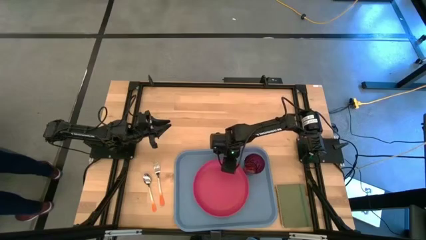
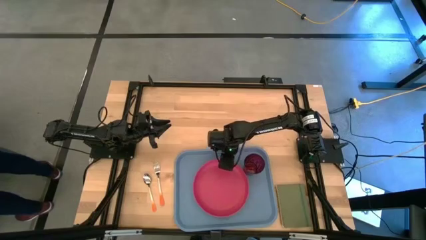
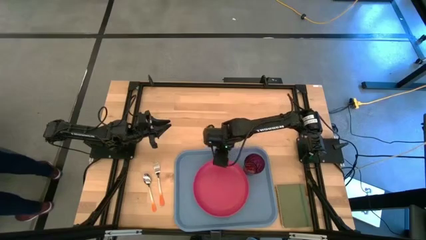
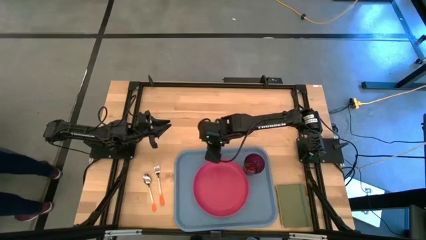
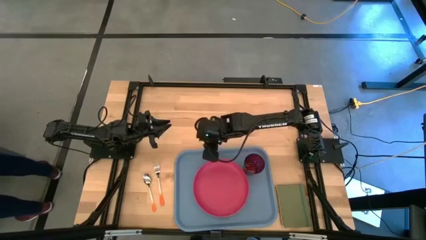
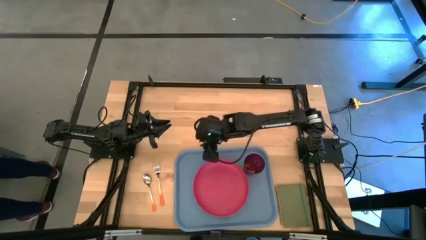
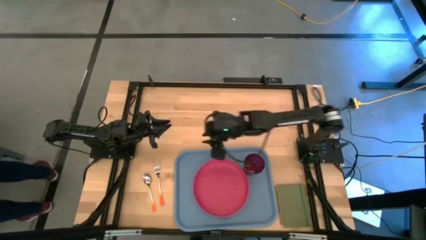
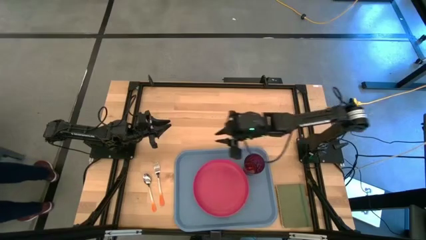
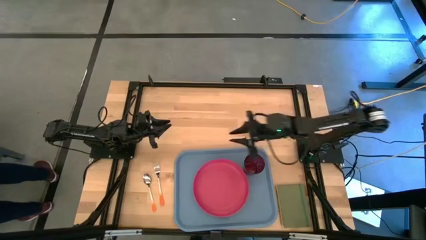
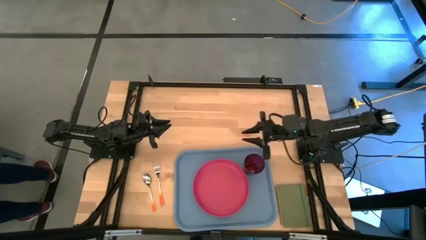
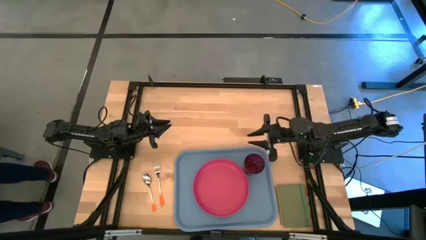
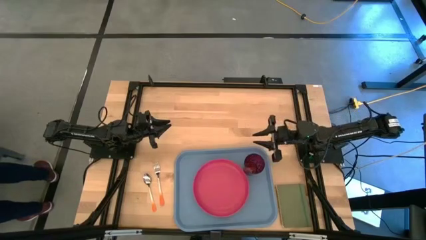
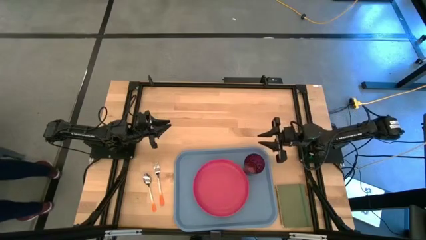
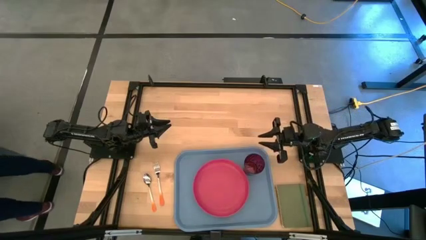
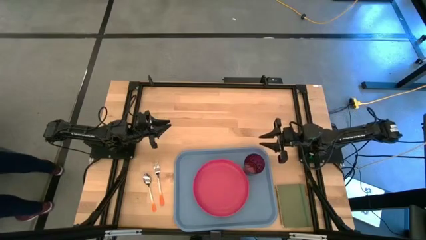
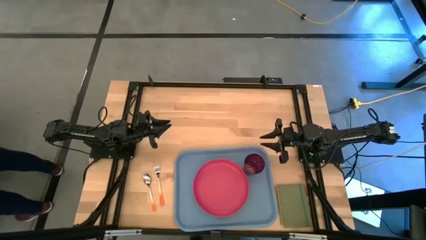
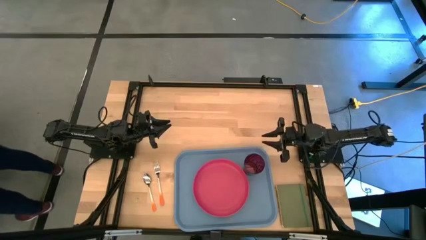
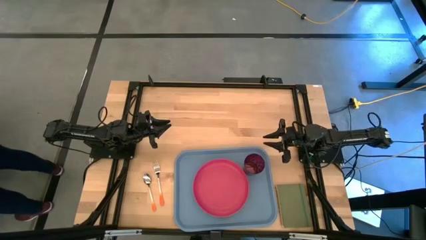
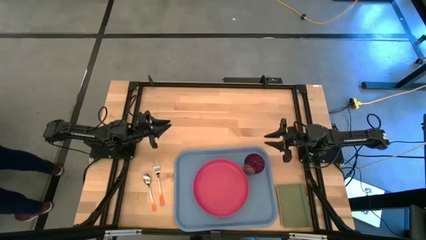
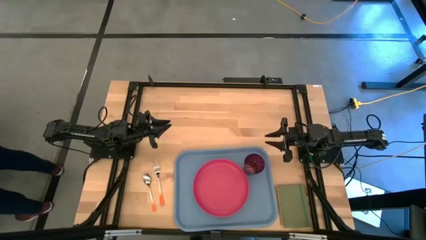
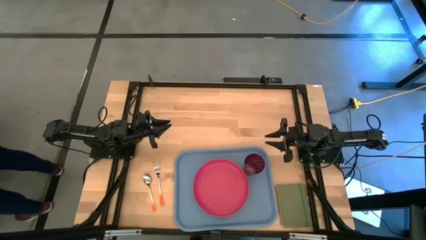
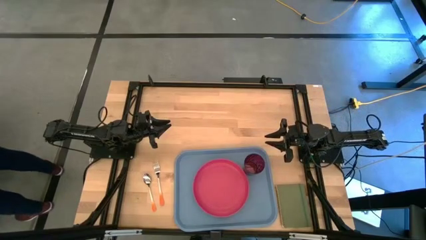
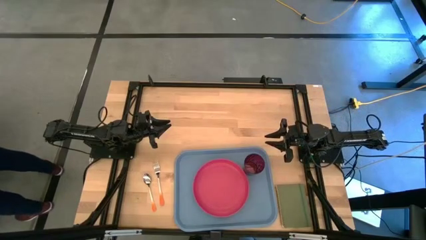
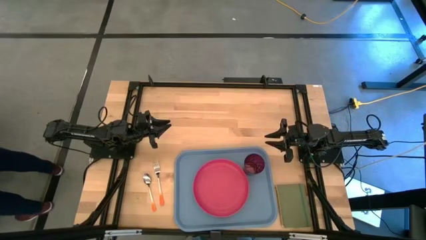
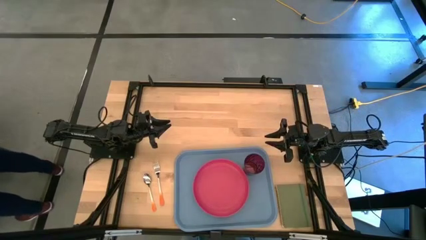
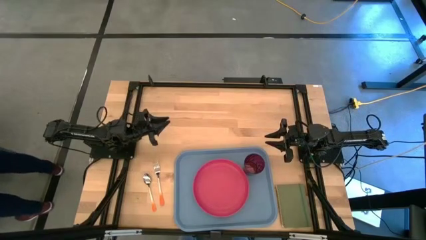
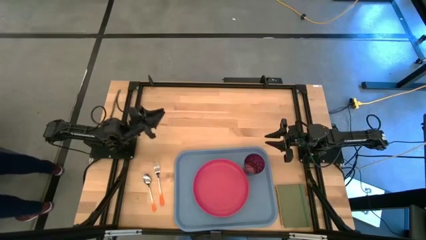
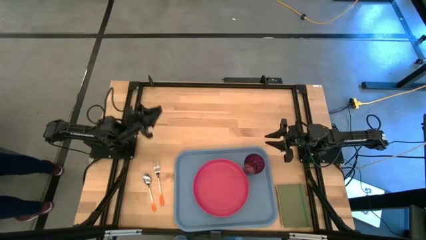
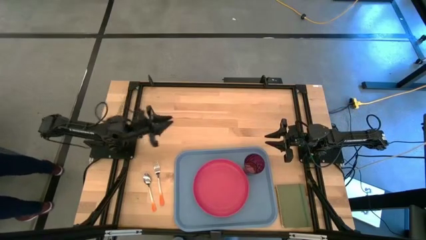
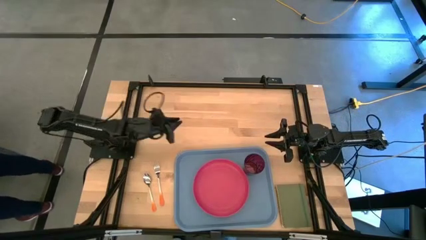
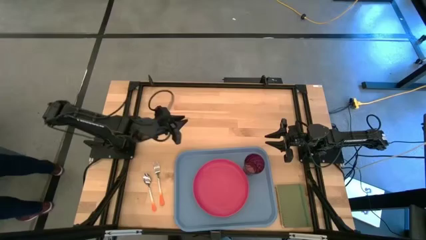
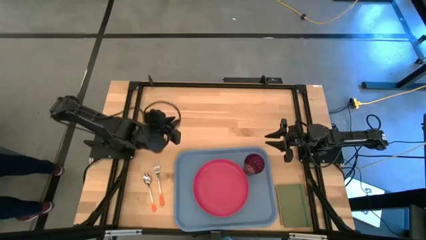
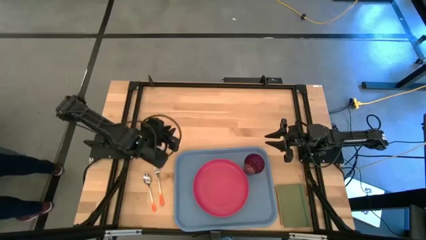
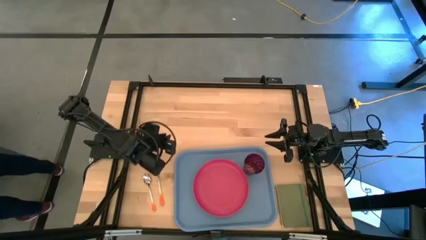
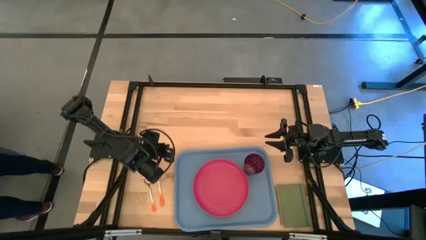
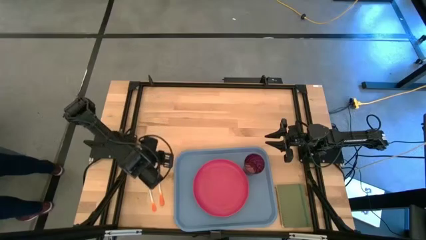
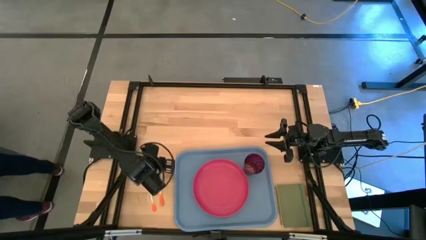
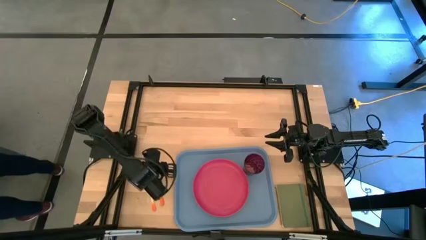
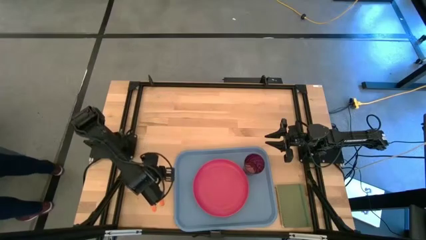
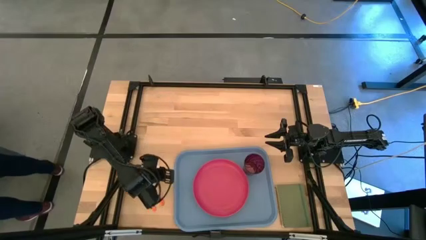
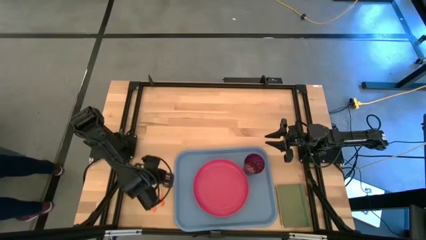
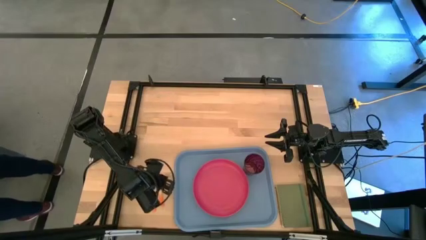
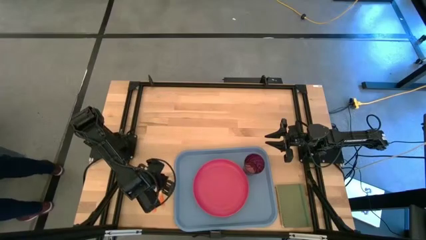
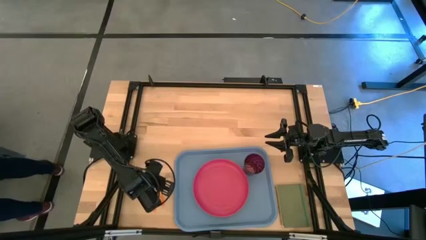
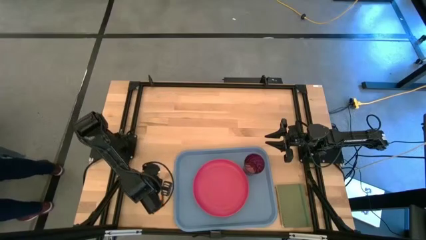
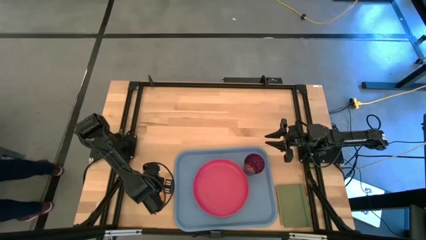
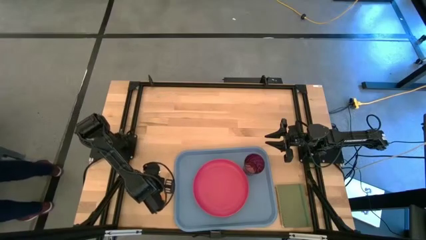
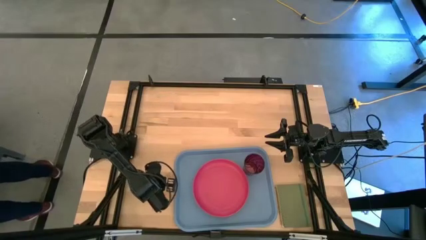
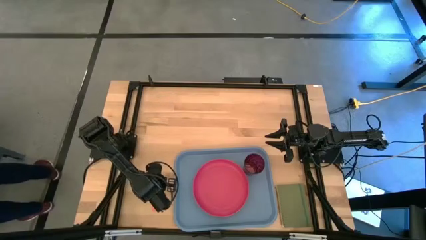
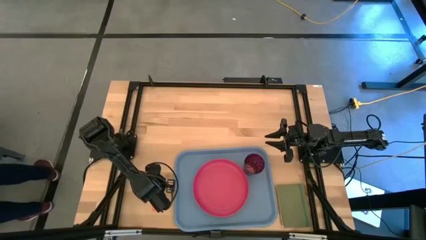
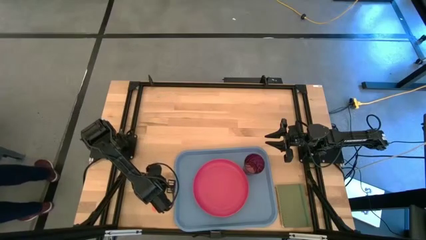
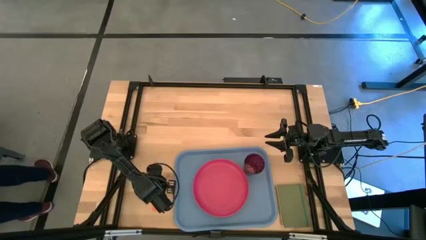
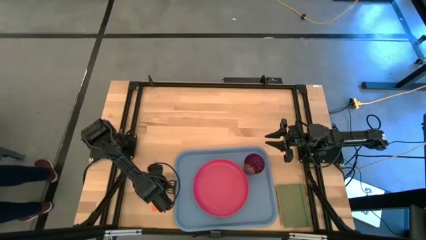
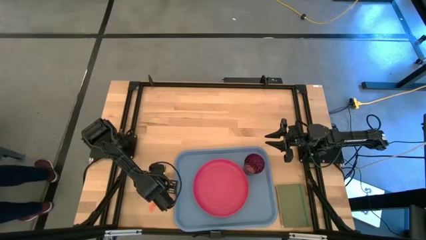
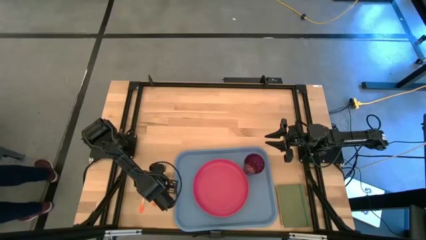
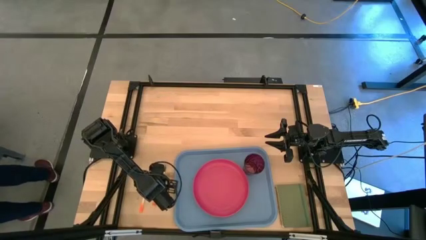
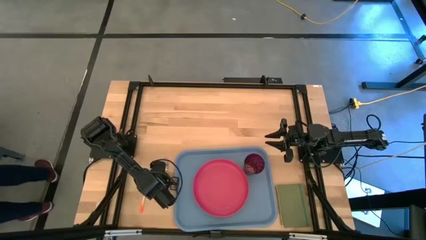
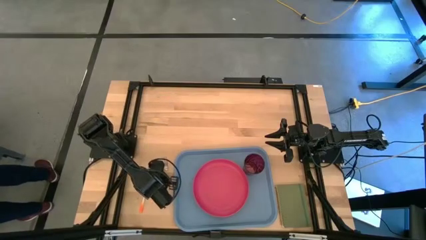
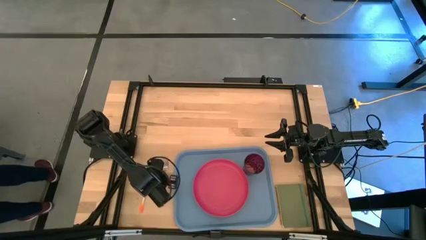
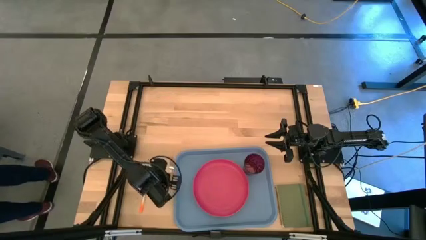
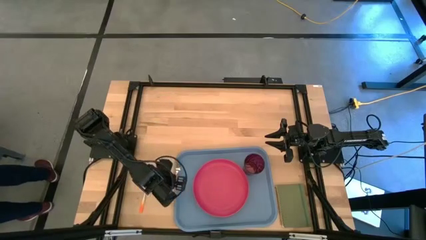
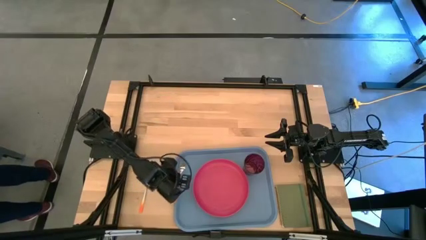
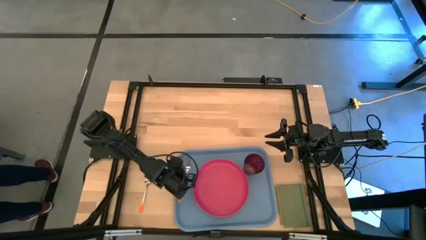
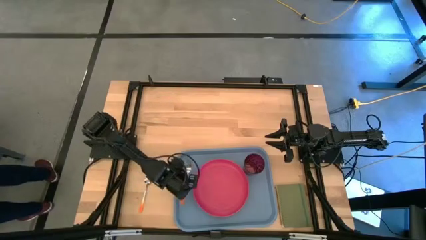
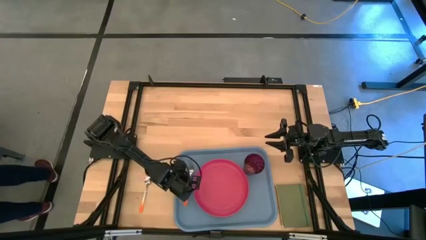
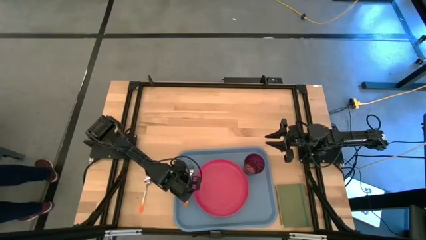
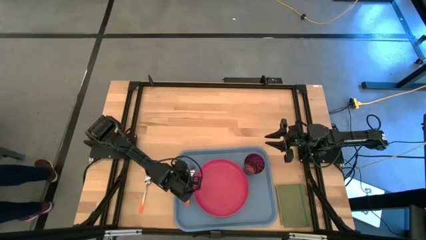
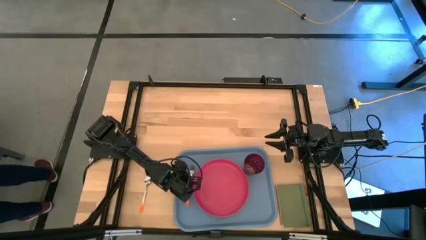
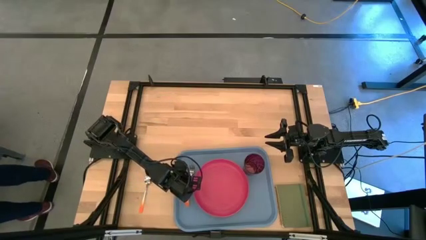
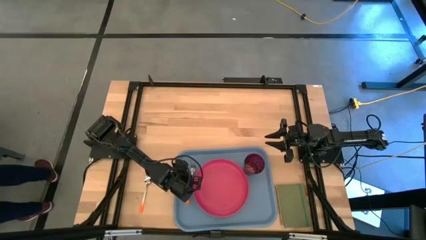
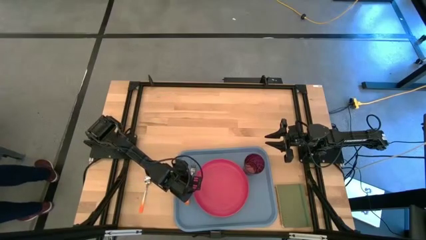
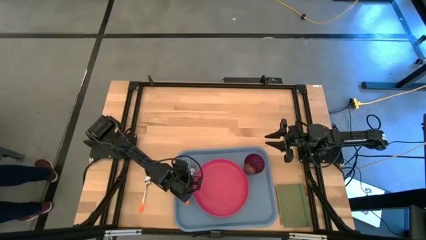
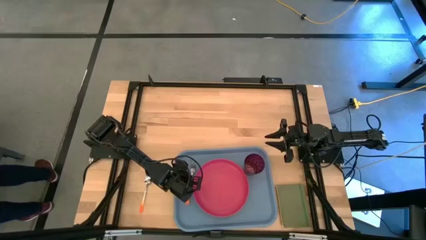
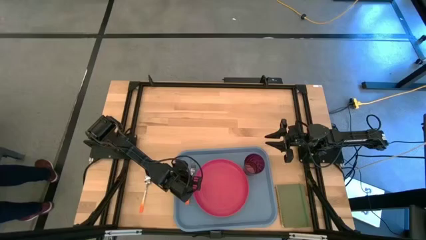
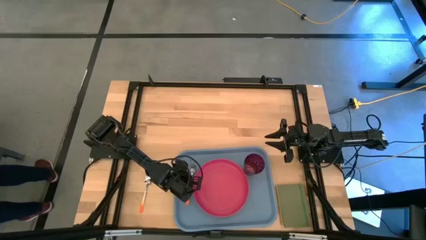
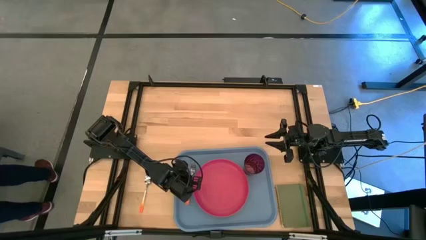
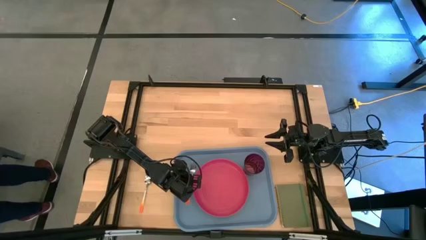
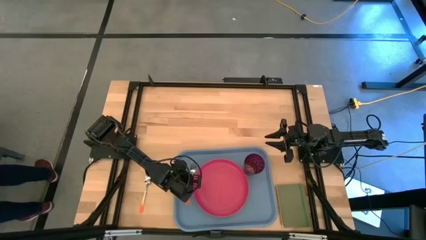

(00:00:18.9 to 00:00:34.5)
Task: Pick and place plate/cup/fork/spoon on tray
Put the orange fork on the blue tray to the left side of the pink plate
